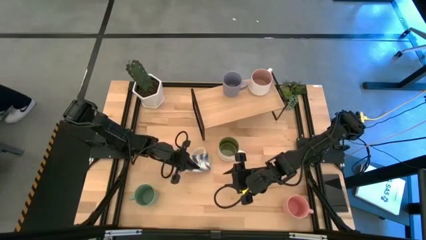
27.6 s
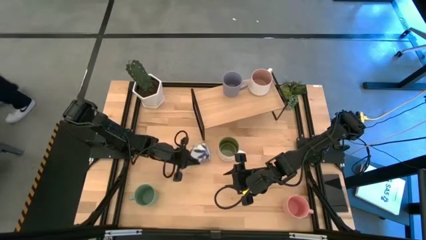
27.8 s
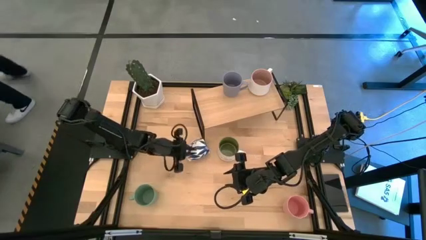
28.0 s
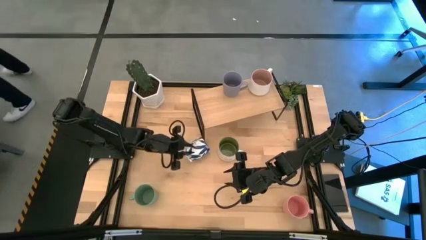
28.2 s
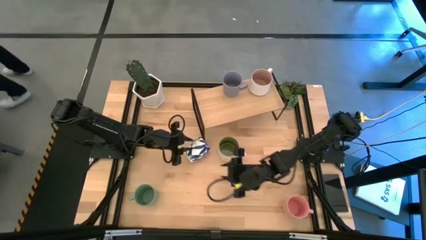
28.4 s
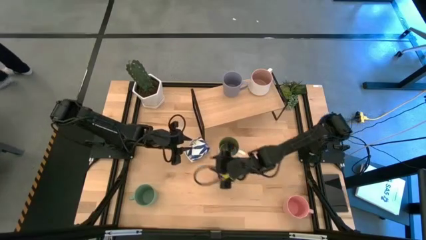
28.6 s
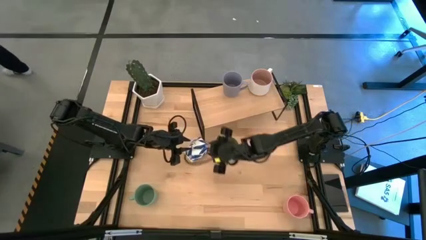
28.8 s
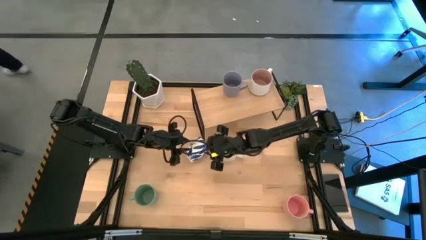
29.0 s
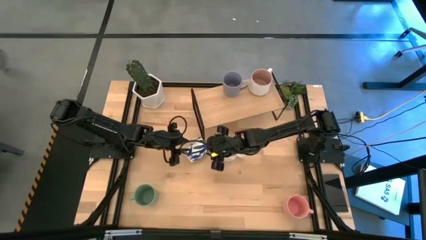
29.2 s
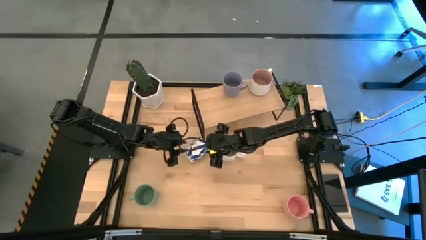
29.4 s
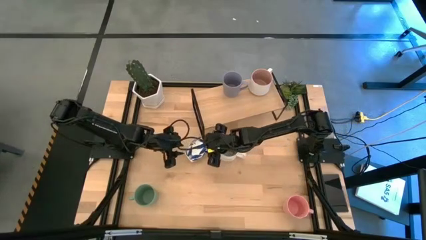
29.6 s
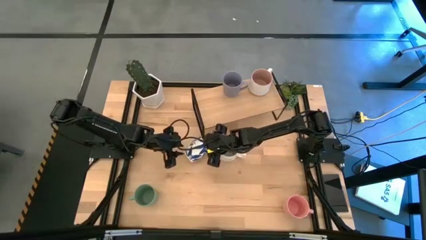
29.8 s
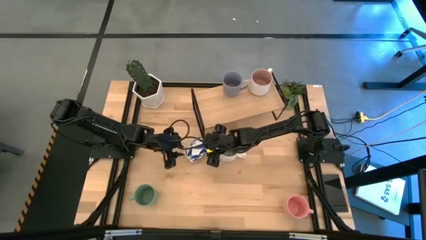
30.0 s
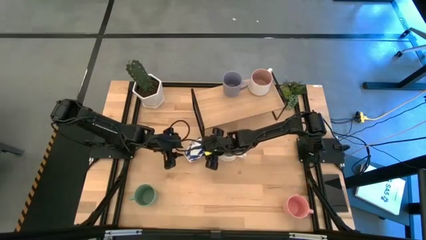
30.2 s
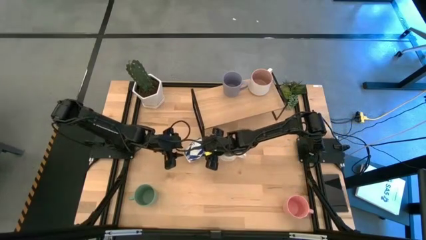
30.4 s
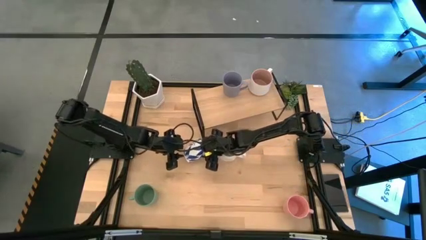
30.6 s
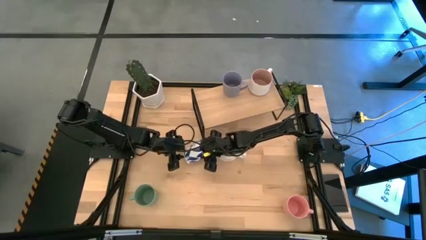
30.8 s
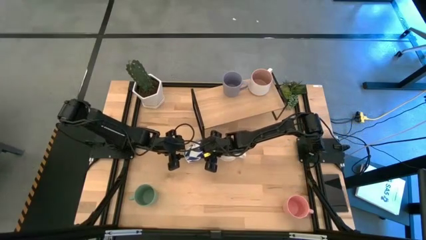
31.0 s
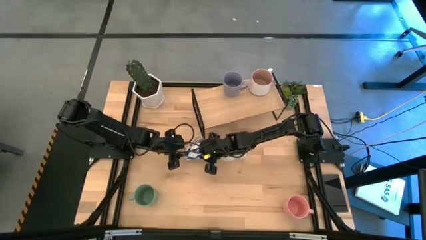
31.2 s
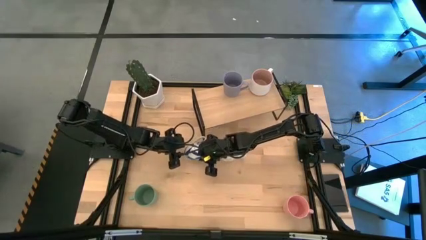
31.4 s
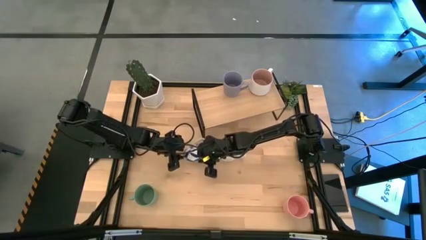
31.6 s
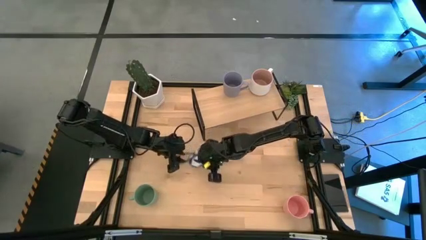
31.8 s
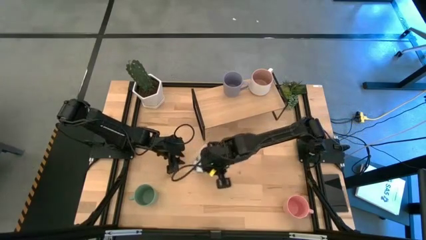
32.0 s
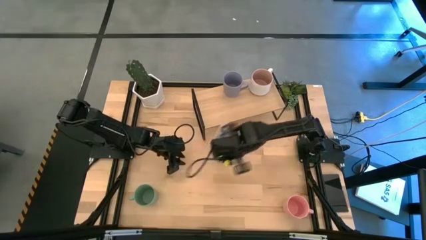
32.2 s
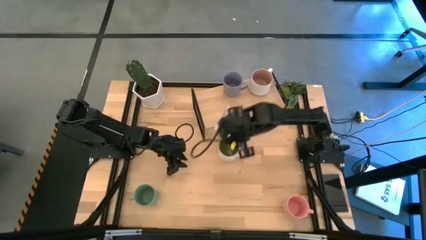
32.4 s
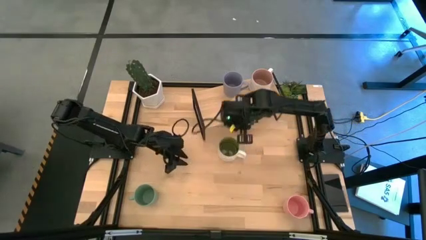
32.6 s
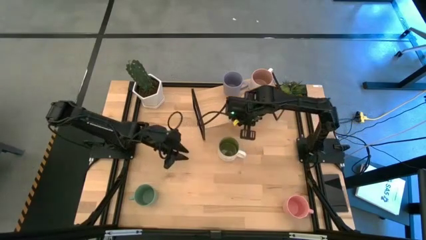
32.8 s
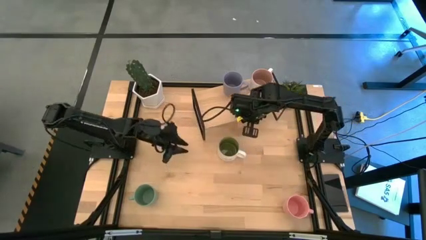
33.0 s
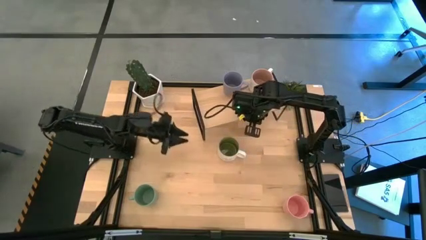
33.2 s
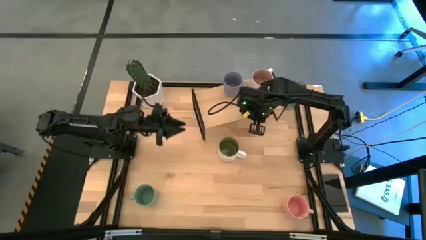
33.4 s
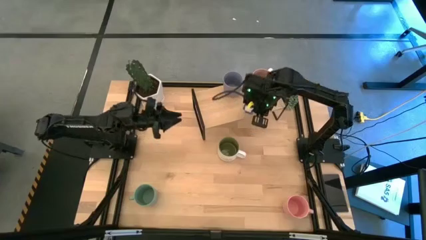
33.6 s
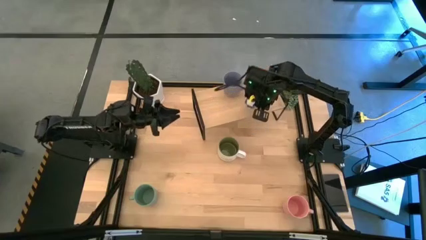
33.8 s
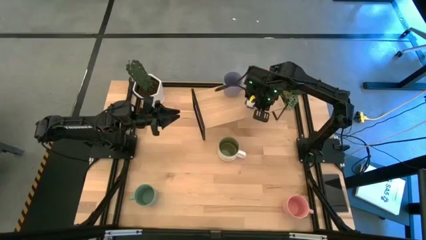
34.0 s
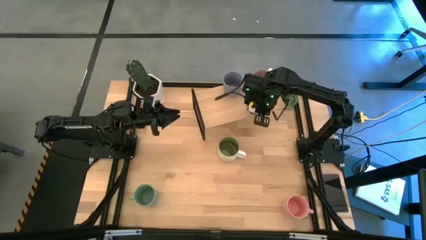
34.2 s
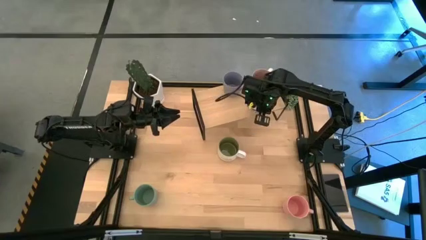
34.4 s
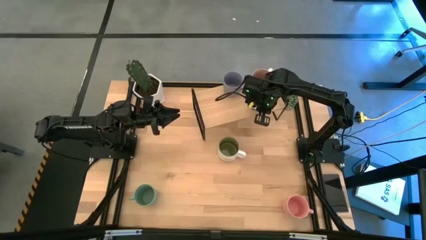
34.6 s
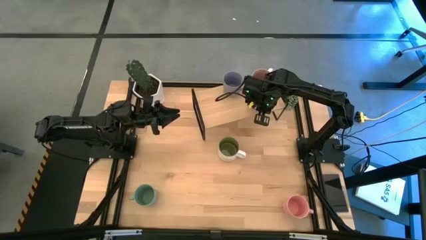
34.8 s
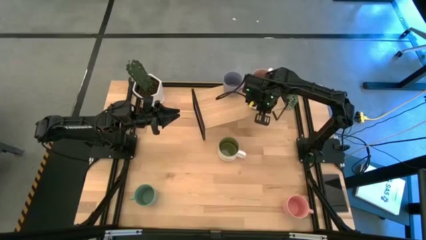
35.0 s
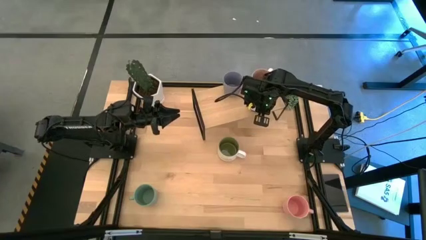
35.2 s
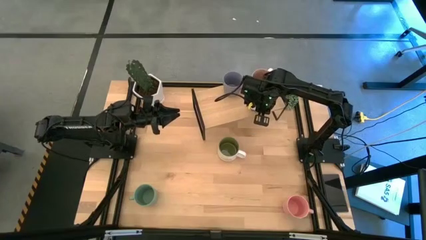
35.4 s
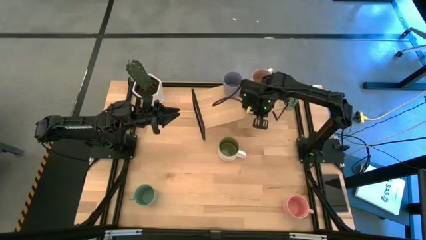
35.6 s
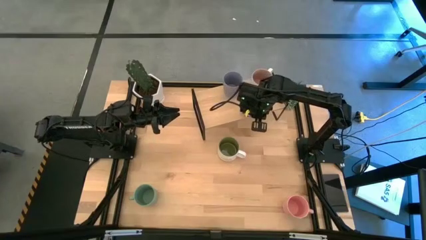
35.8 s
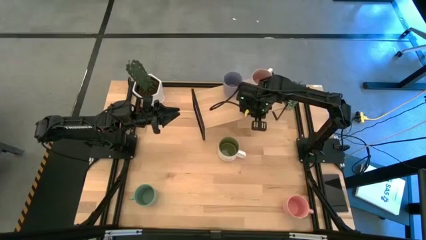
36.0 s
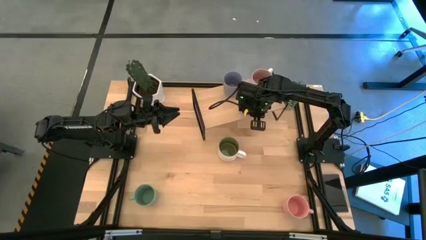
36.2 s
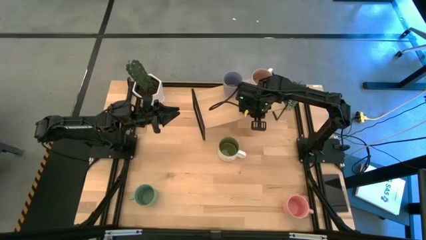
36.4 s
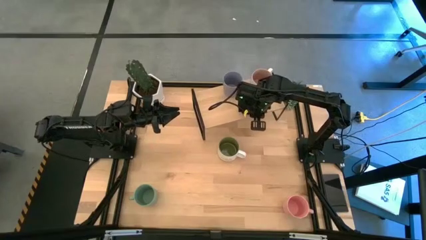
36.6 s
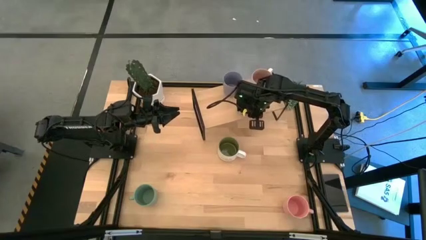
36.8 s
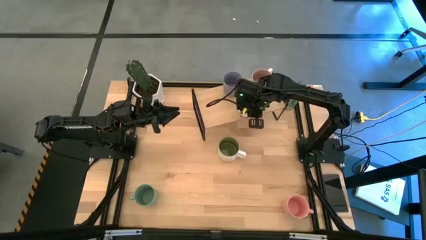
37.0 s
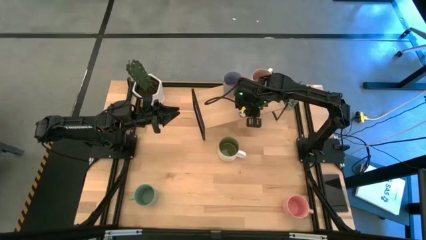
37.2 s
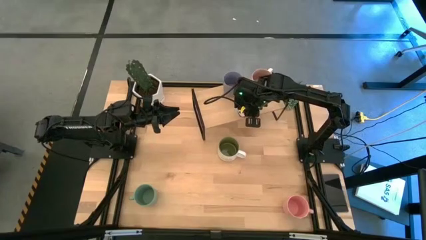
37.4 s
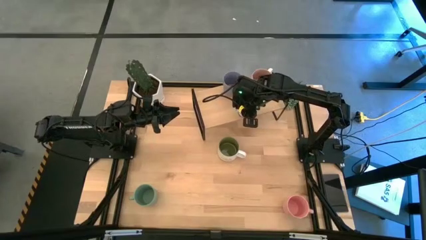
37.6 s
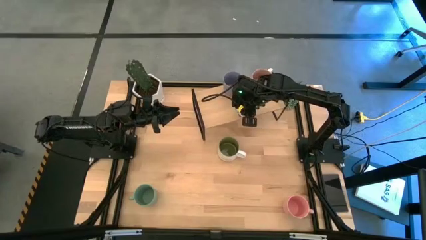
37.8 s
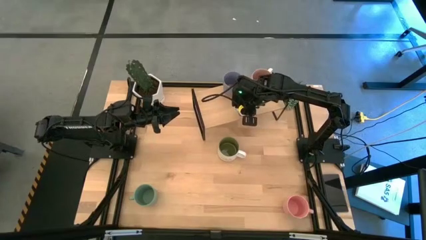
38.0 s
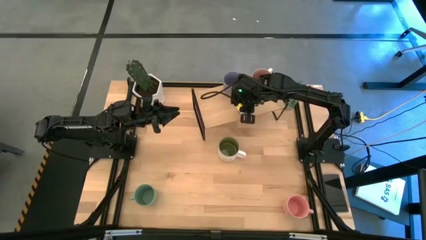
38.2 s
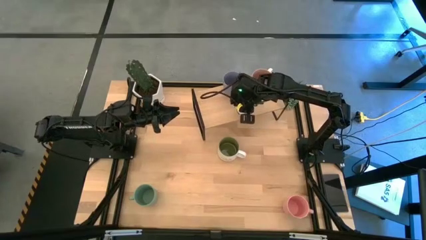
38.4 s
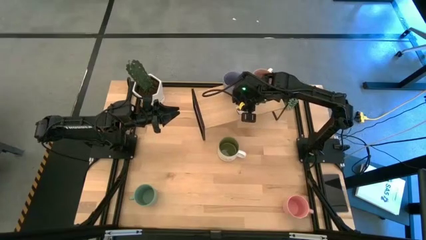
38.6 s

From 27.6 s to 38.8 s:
Task: Place coffee mugs
Put the blue pattern mug on the shelf
